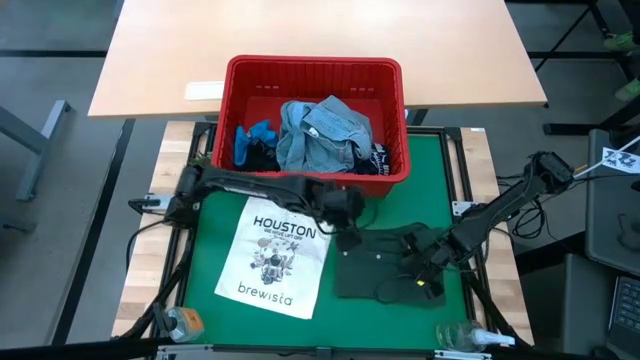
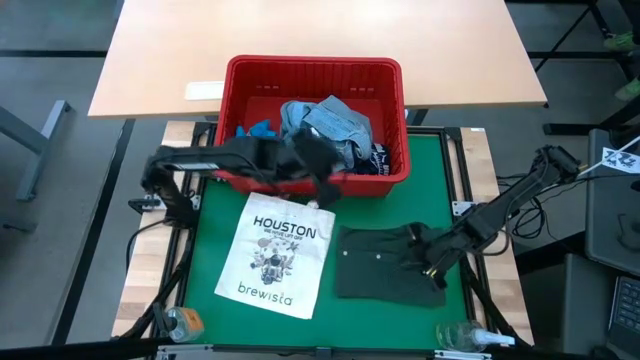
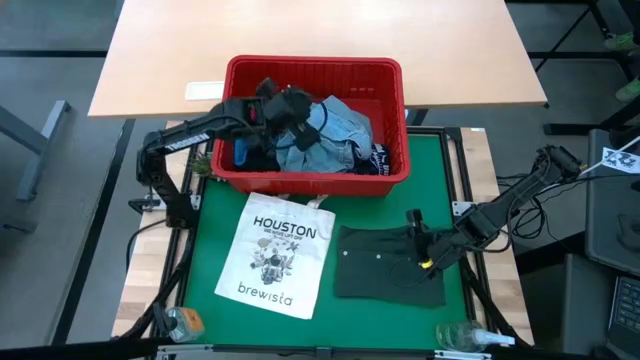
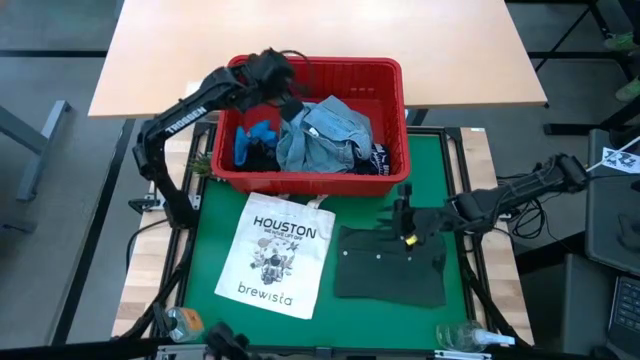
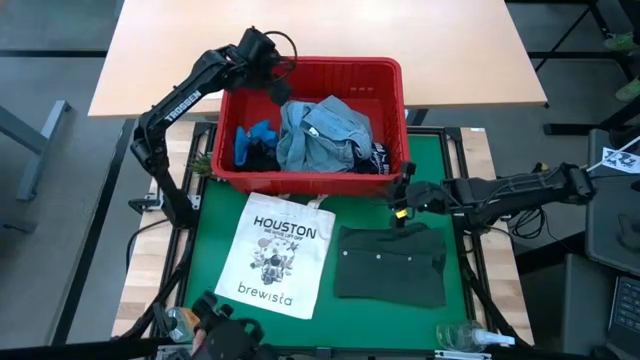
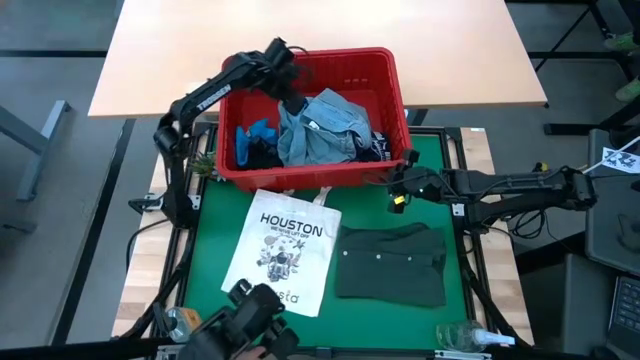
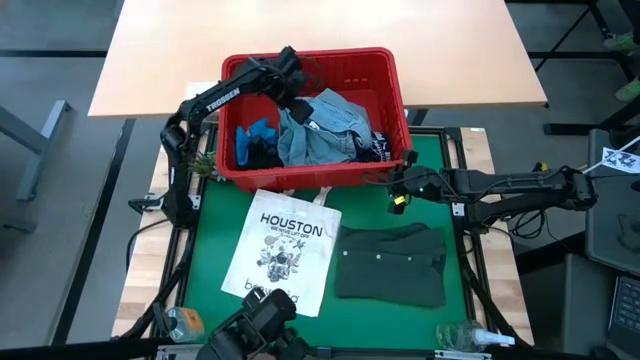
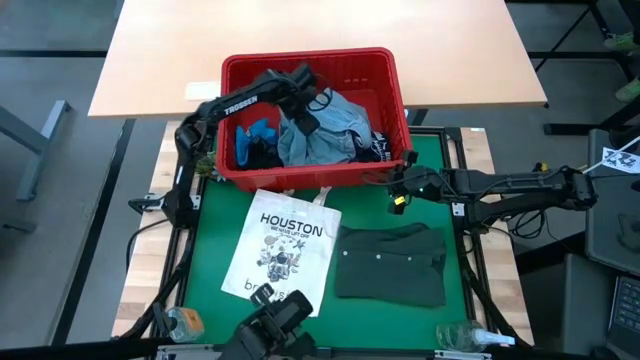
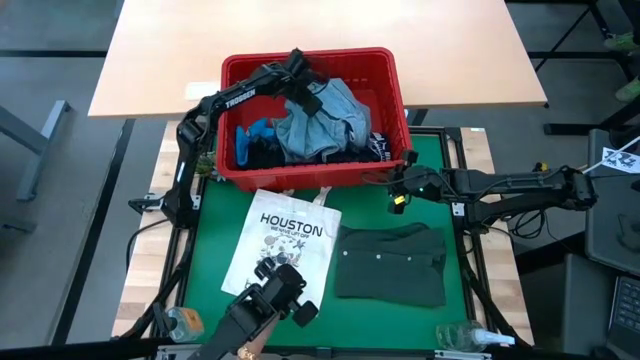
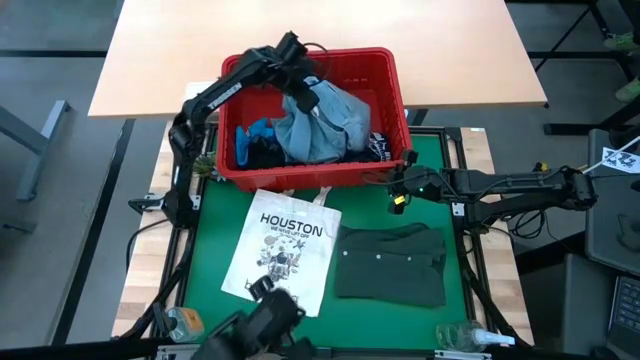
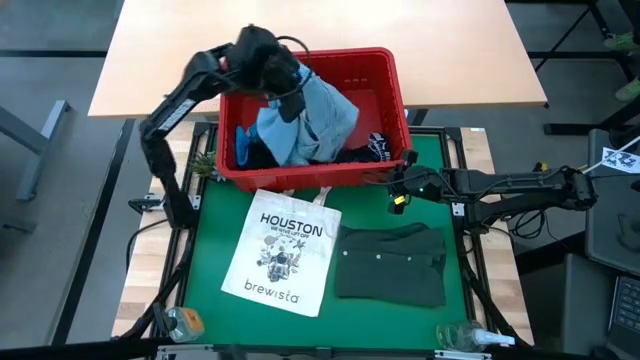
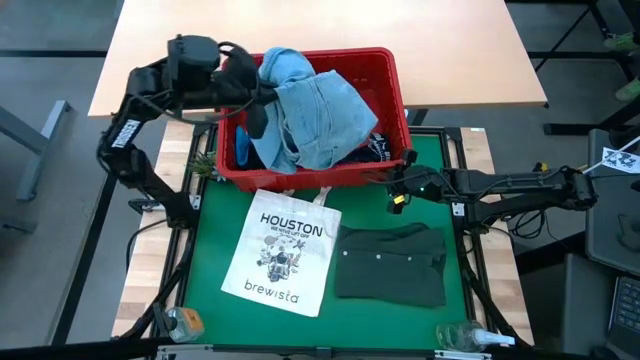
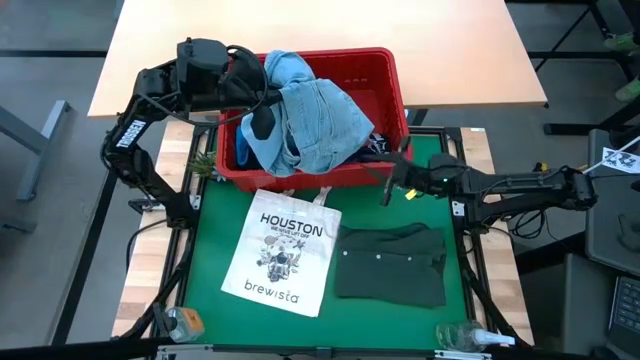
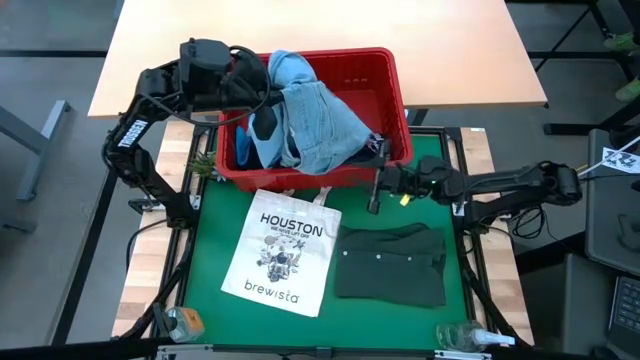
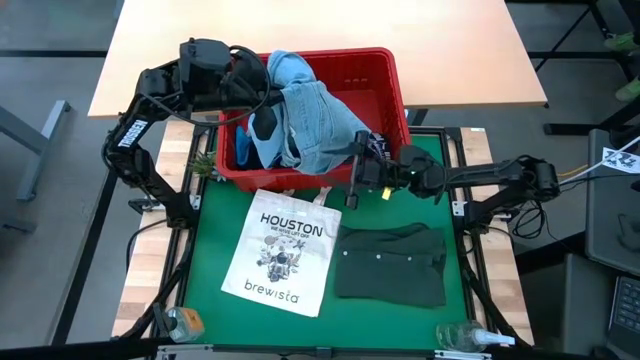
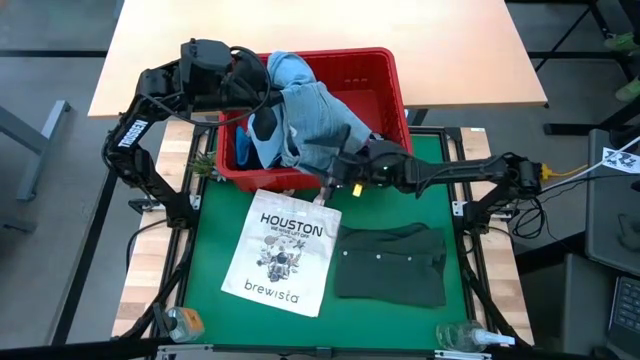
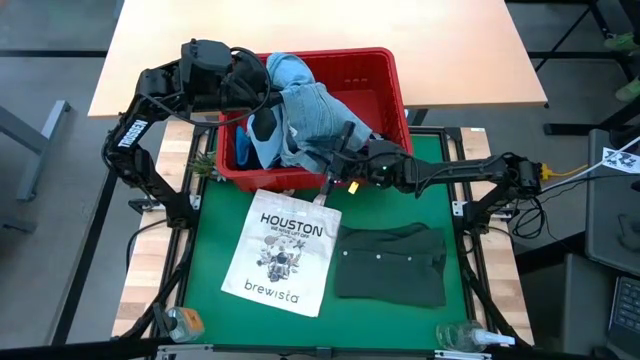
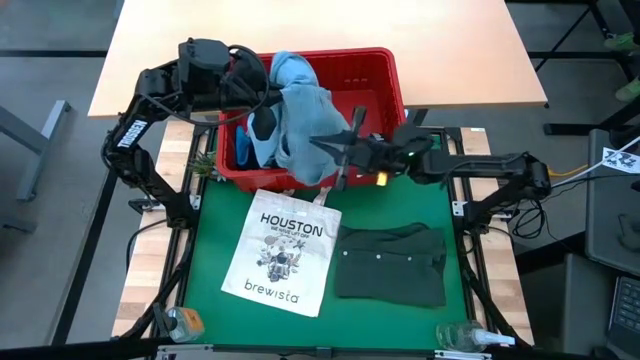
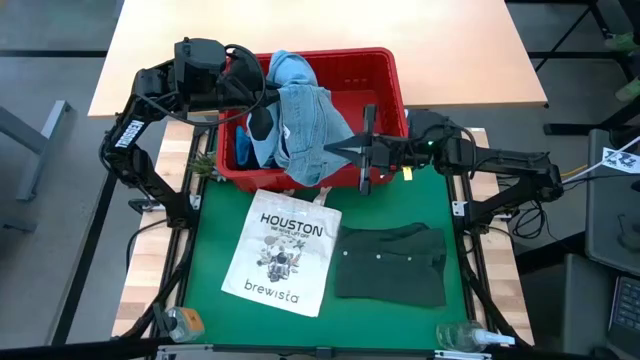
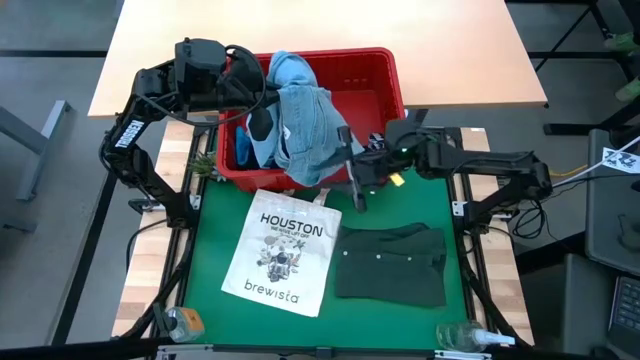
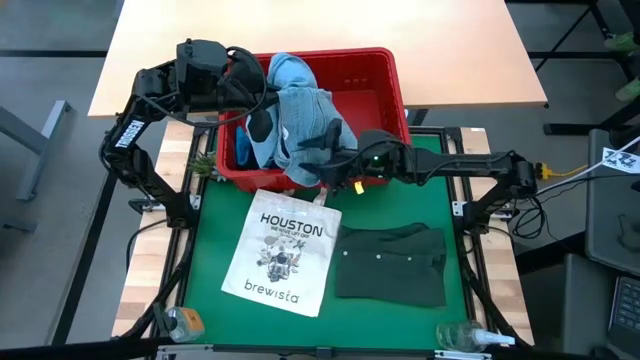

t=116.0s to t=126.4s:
Task: Fold Laundry from Bin
Fold the light blue jeans

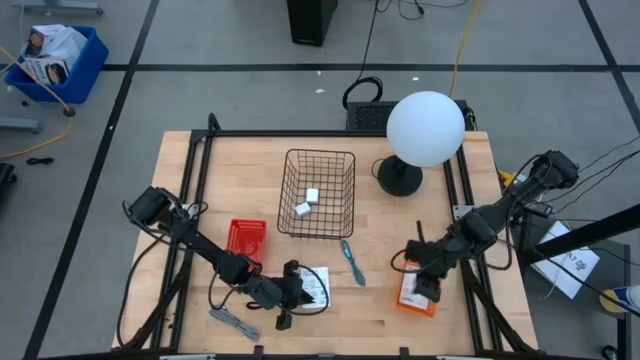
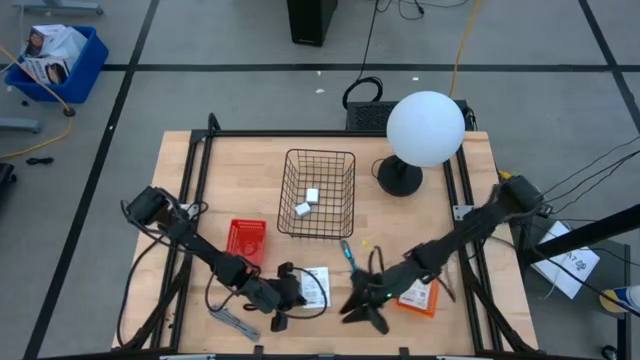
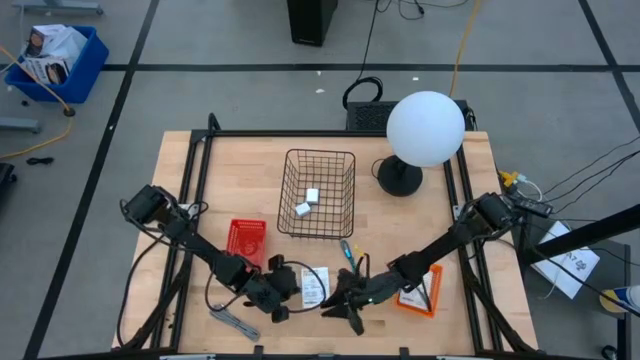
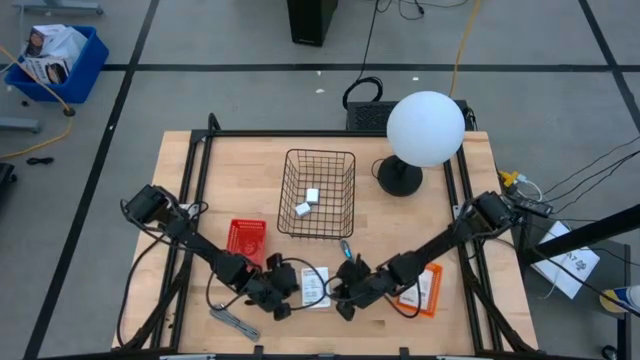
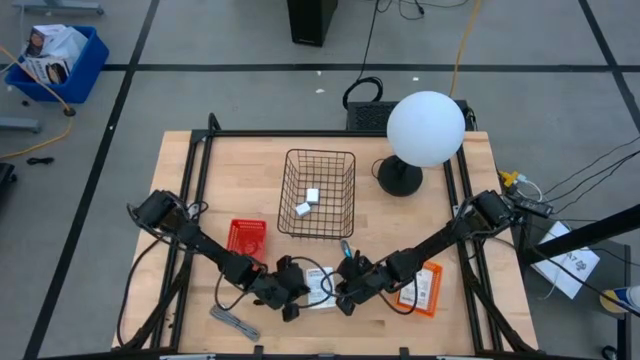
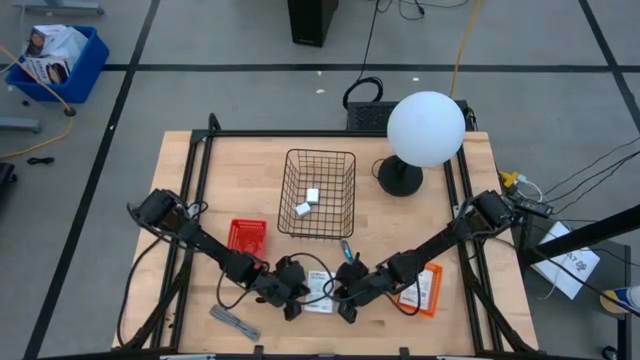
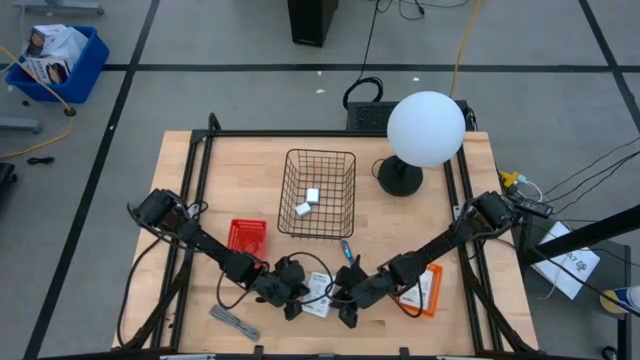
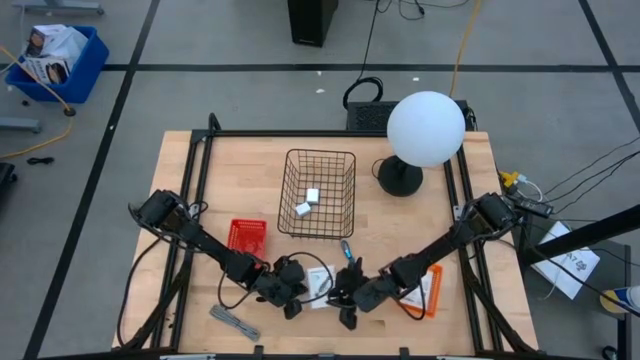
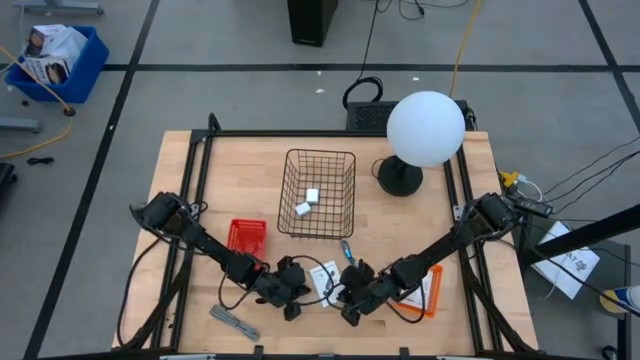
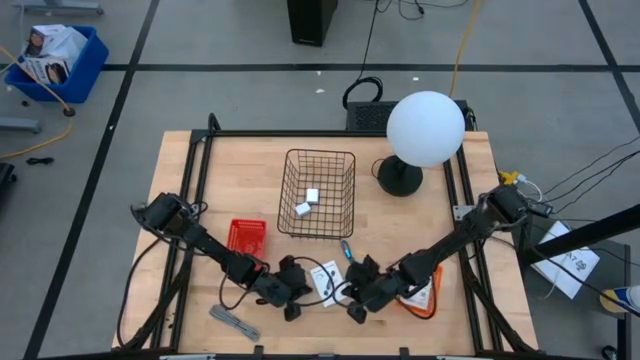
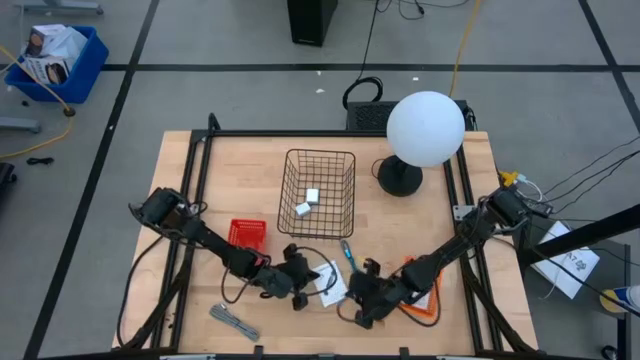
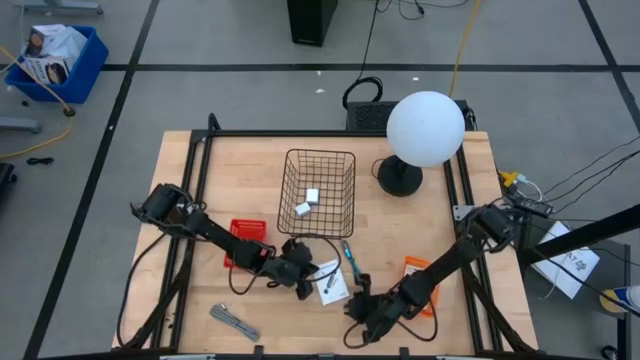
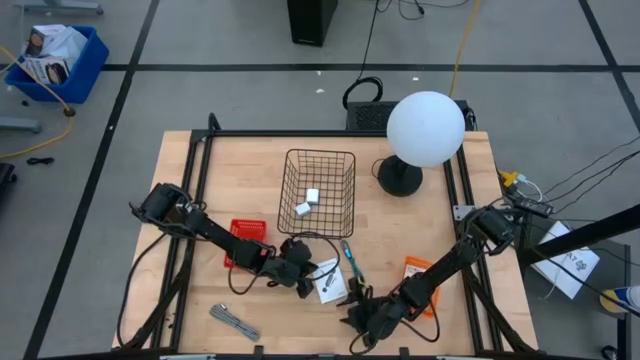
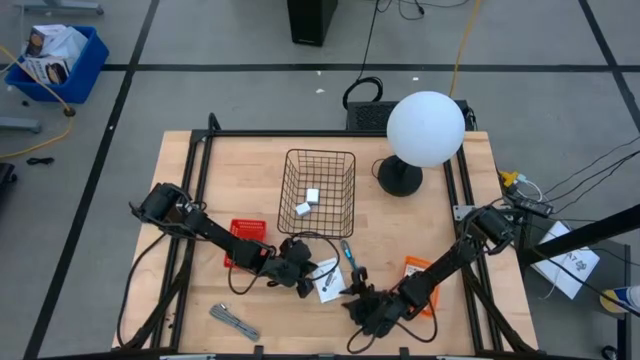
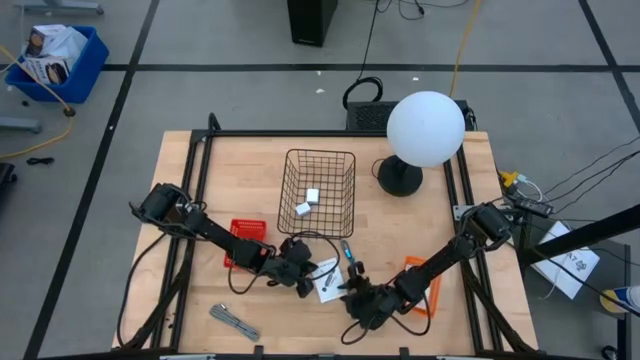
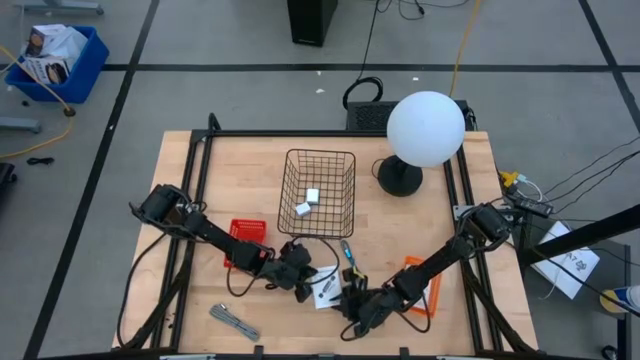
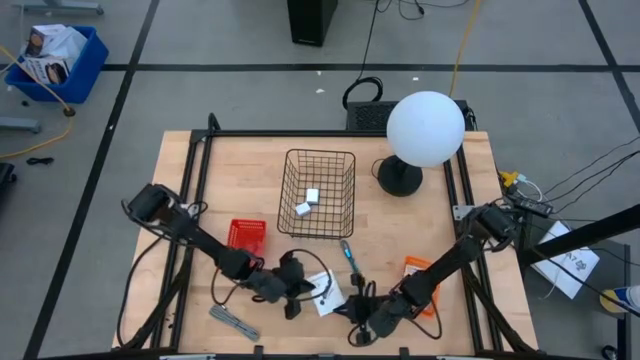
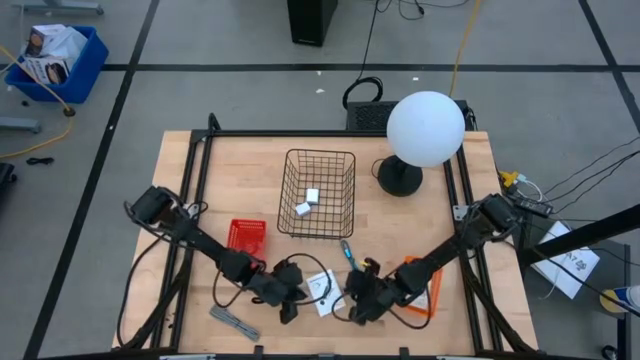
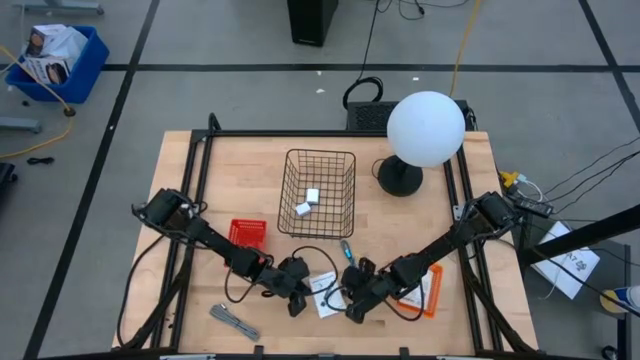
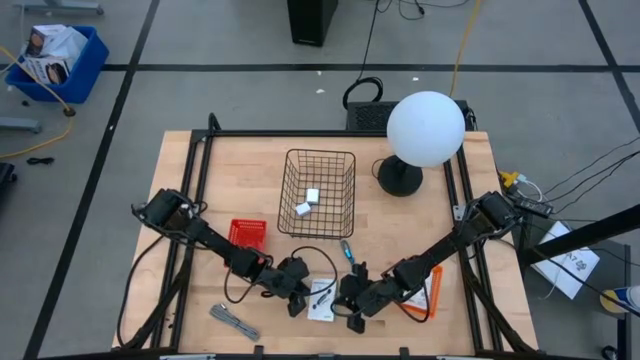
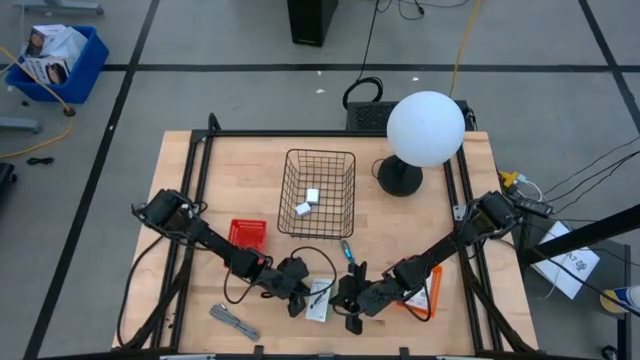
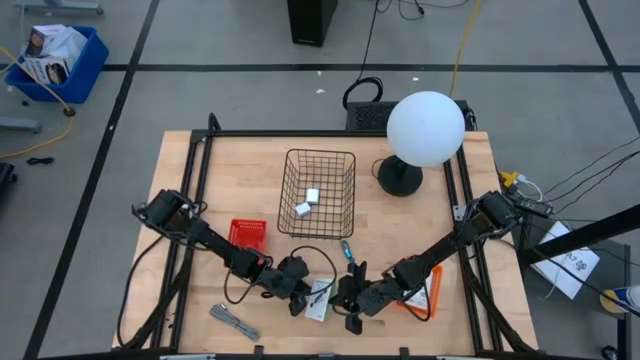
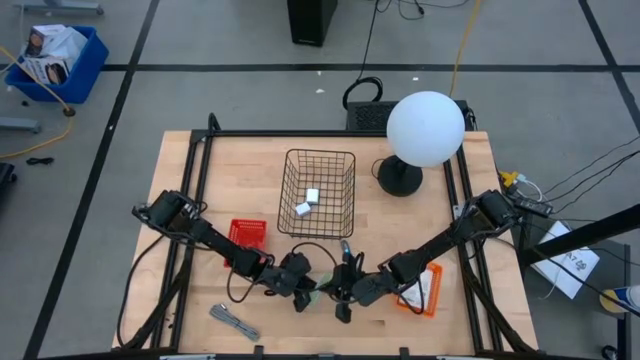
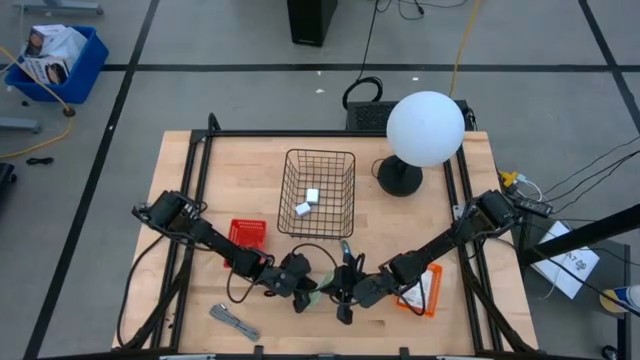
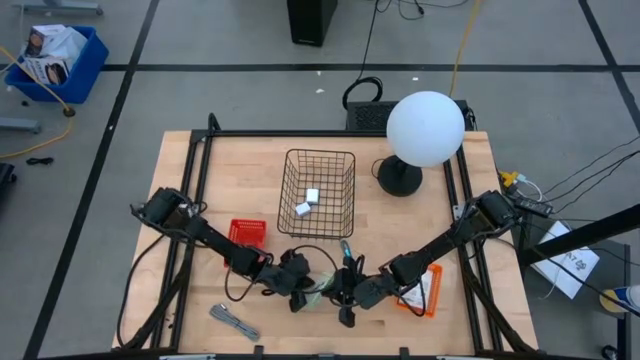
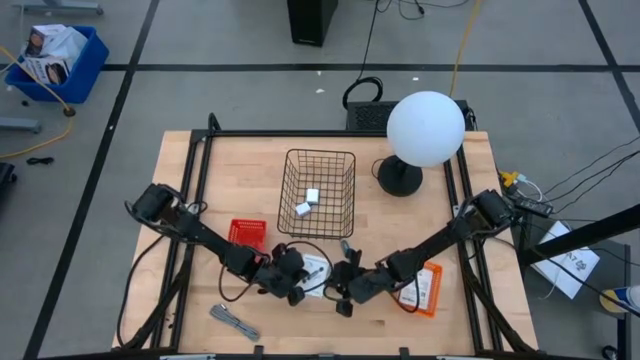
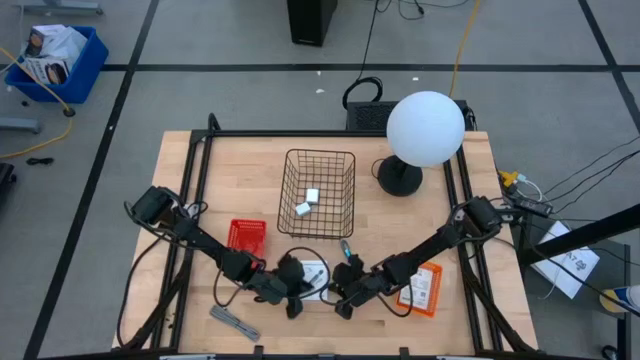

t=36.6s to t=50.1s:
Task: Pick and place items into bin
Put the card reader box into the orange basket
